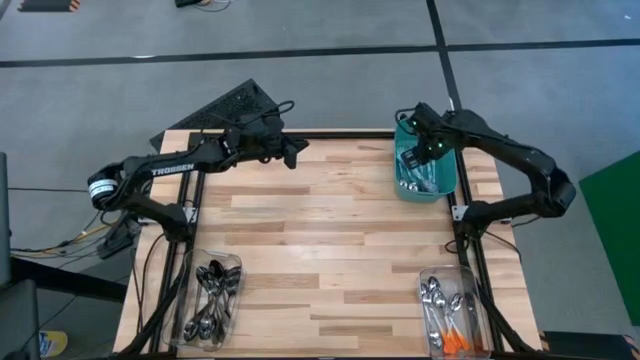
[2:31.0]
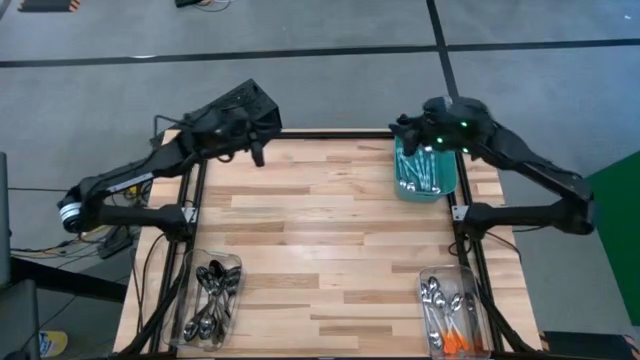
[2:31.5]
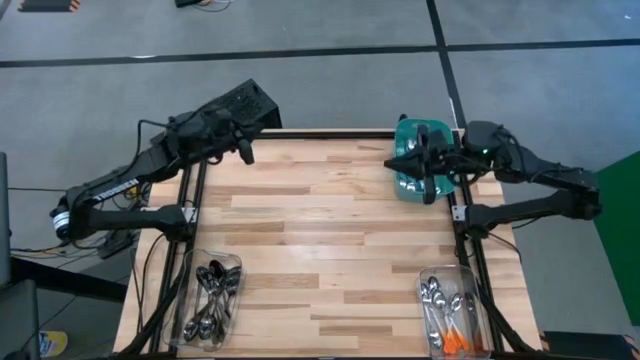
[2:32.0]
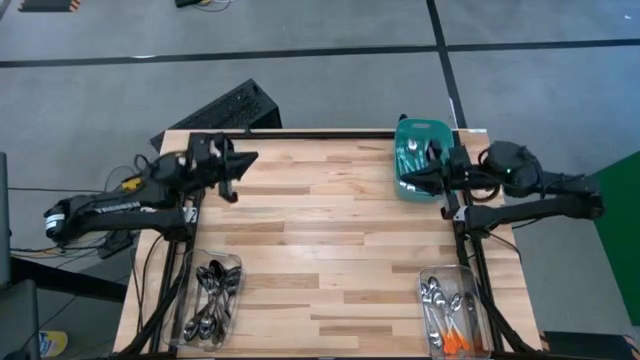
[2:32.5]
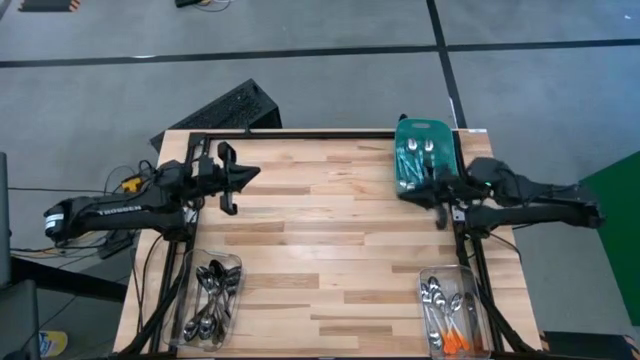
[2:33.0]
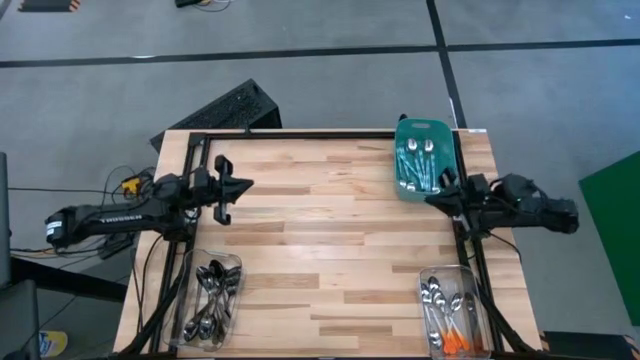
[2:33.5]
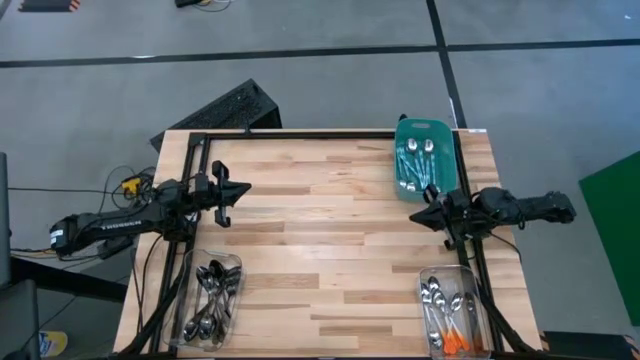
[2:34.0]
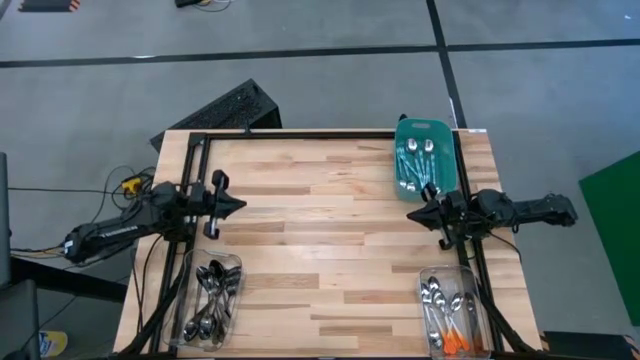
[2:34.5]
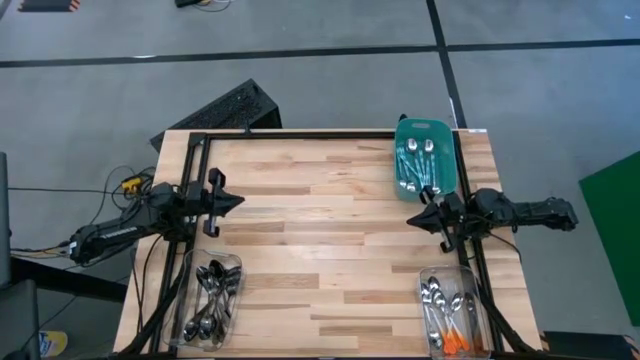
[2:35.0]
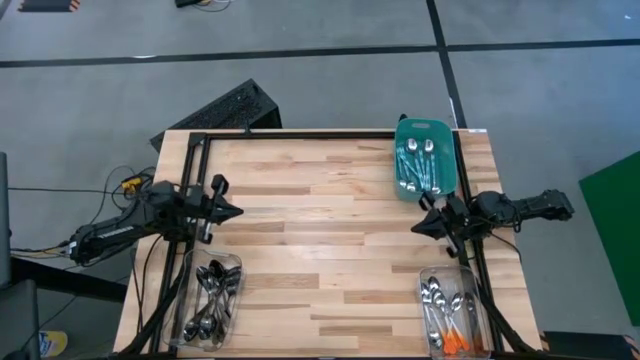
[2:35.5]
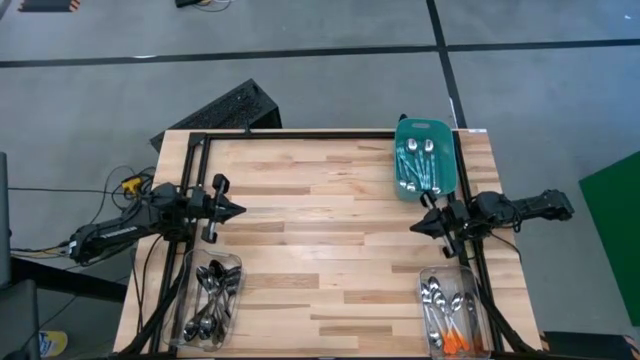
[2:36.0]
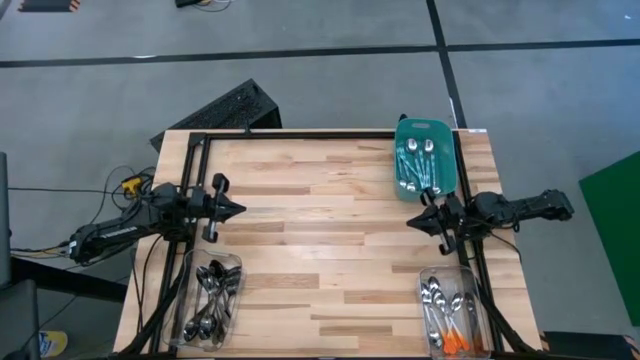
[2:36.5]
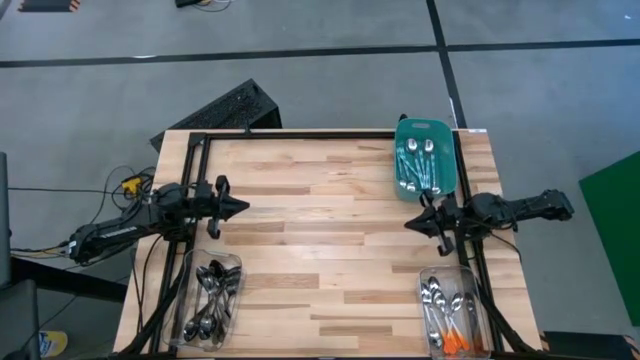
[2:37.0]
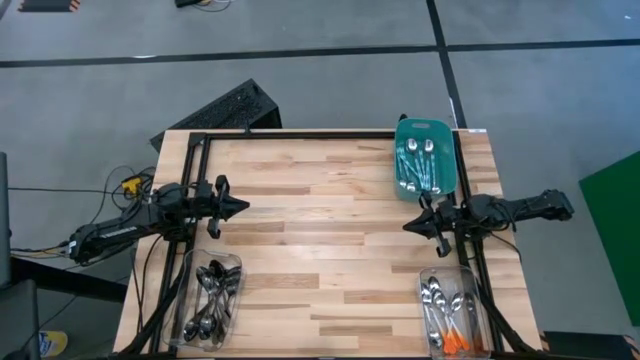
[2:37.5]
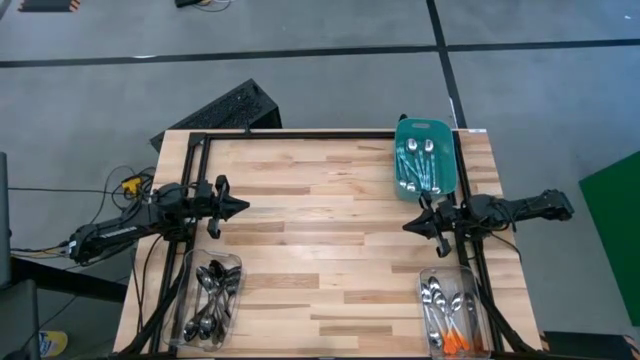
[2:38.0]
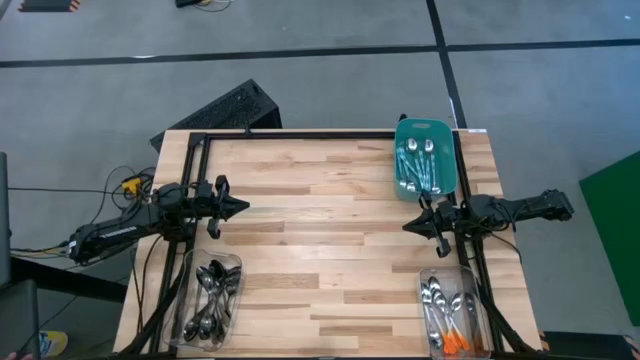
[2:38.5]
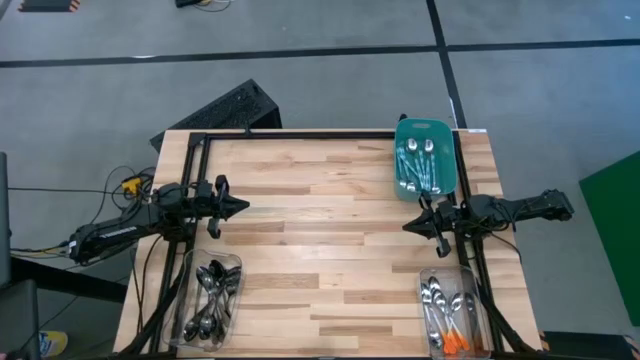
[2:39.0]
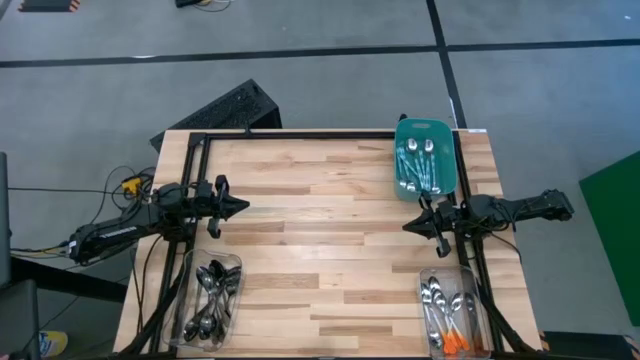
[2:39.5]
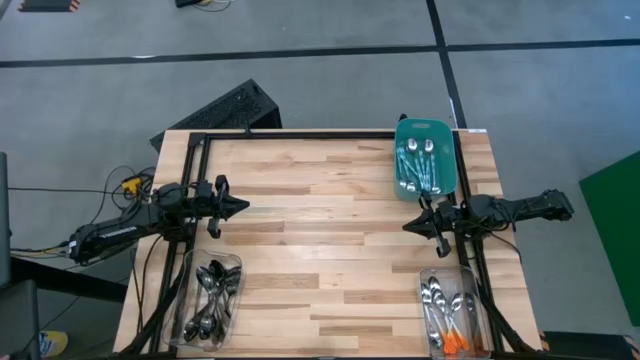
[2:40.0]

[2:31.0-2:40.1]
Task: Sort silverware by color (type)
Return to Home Position

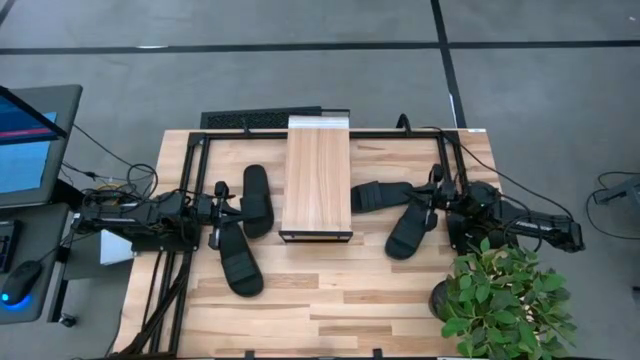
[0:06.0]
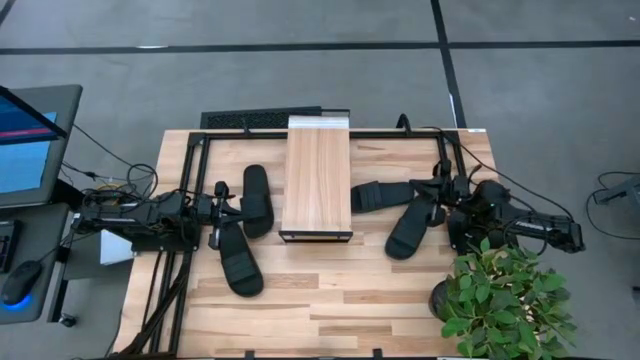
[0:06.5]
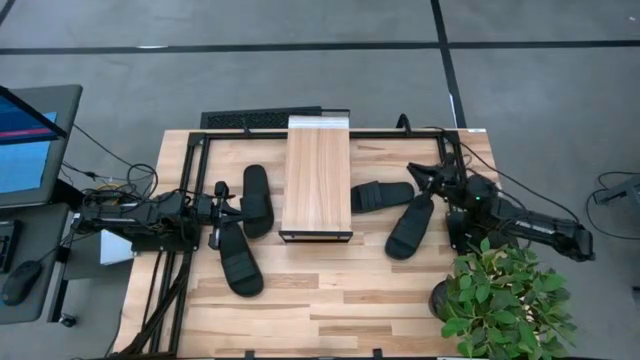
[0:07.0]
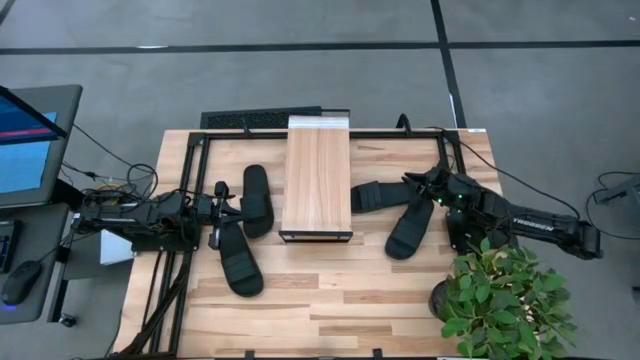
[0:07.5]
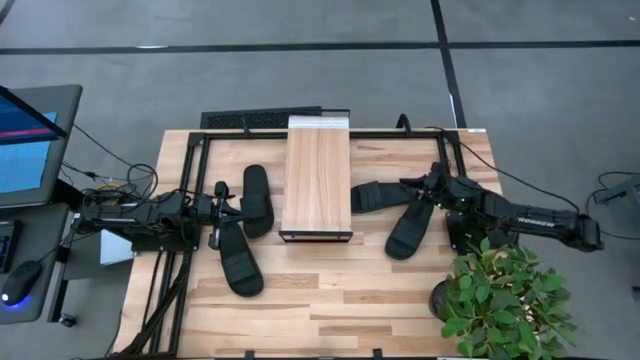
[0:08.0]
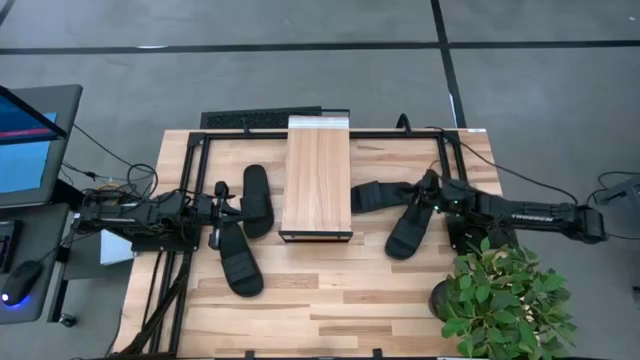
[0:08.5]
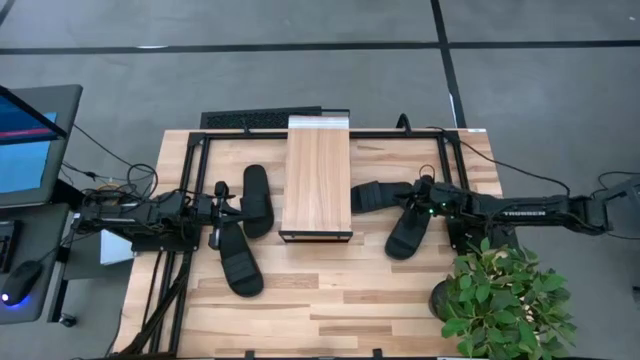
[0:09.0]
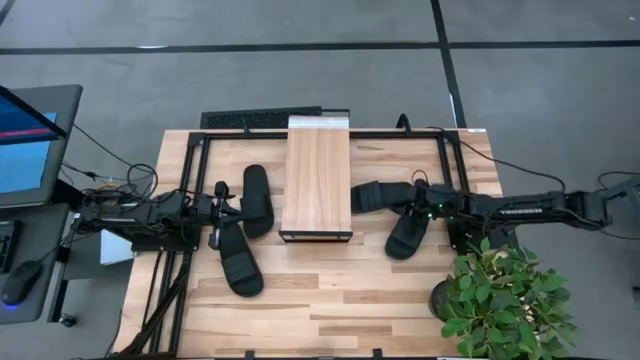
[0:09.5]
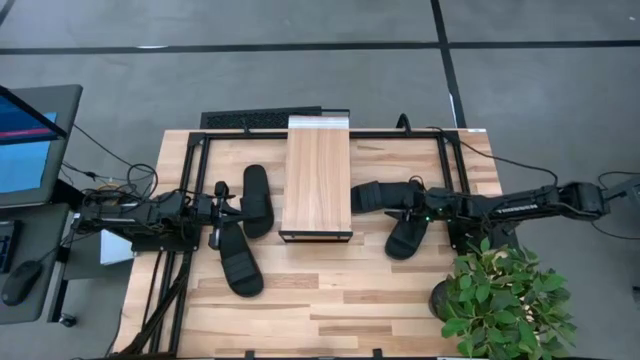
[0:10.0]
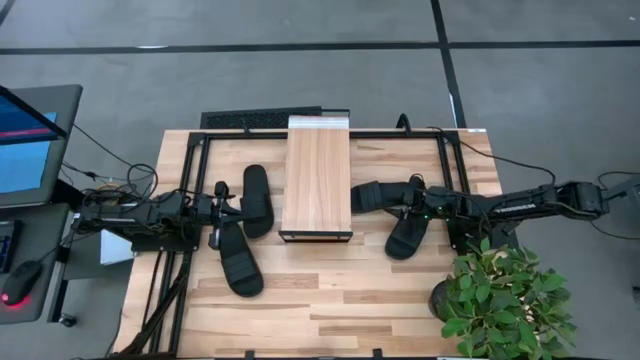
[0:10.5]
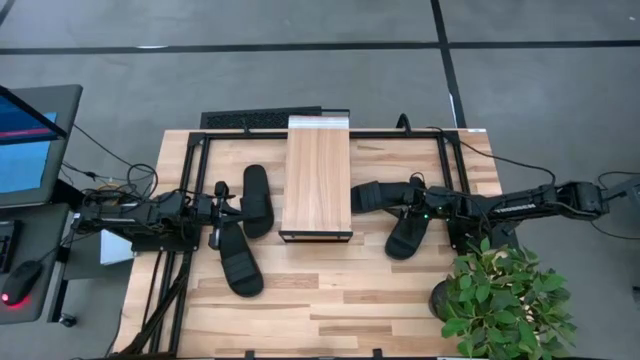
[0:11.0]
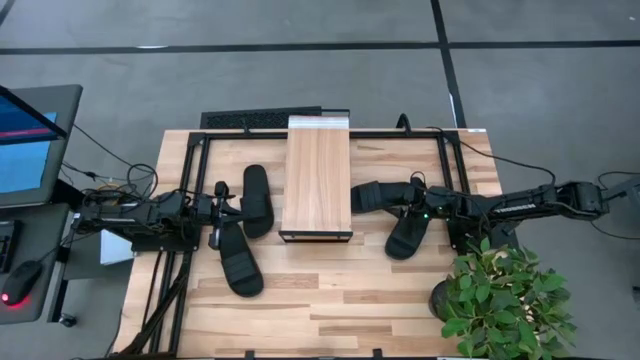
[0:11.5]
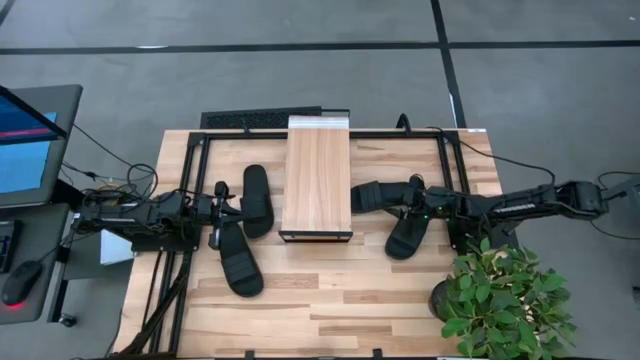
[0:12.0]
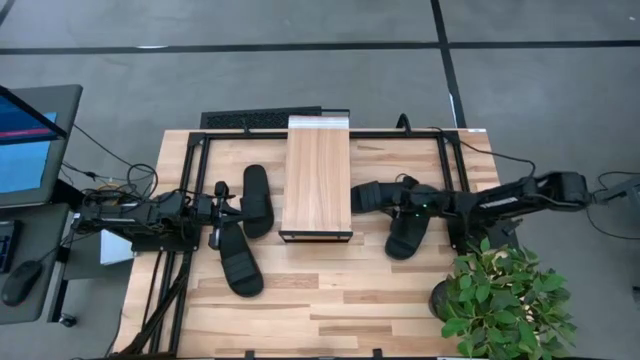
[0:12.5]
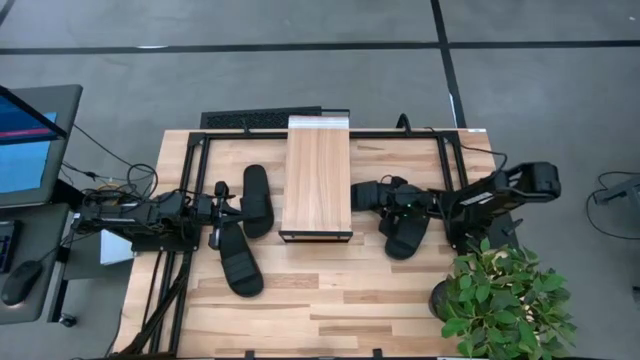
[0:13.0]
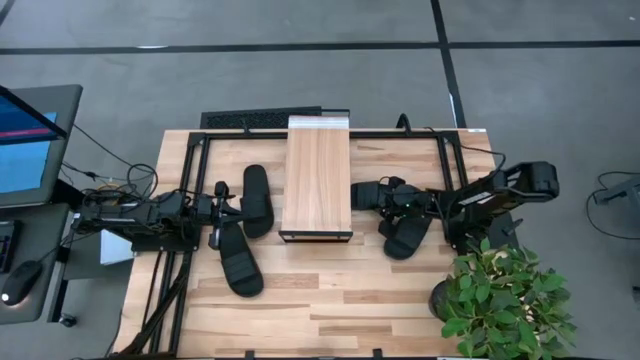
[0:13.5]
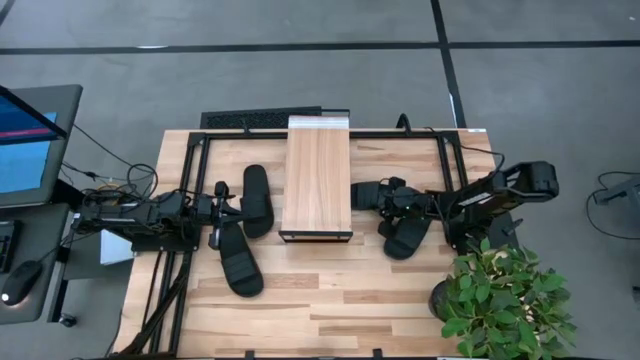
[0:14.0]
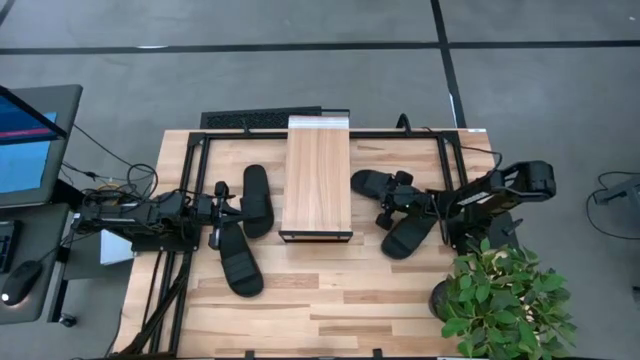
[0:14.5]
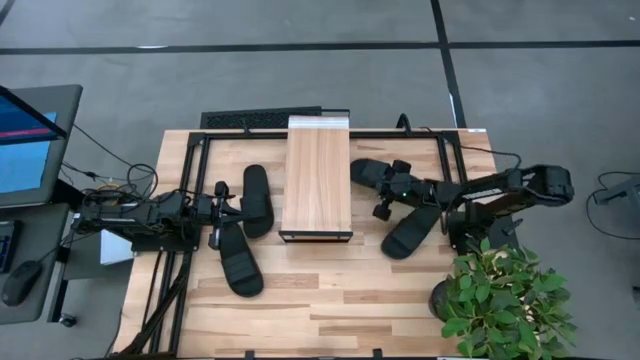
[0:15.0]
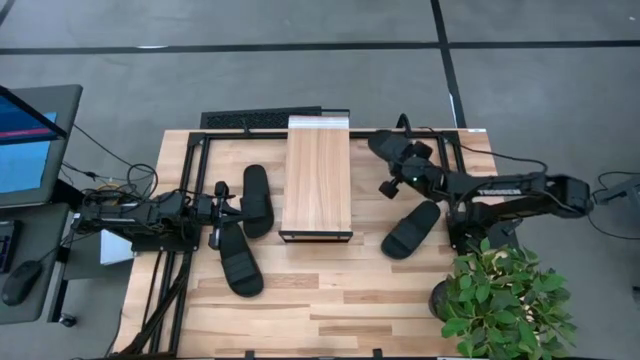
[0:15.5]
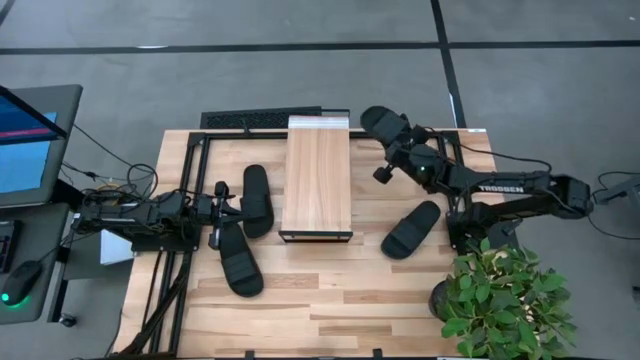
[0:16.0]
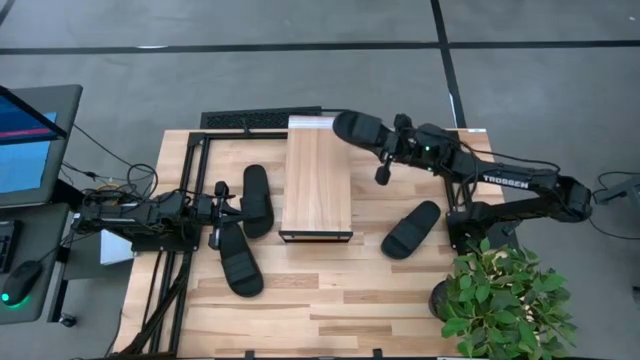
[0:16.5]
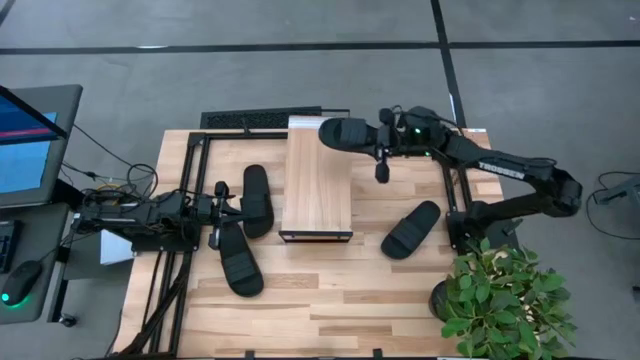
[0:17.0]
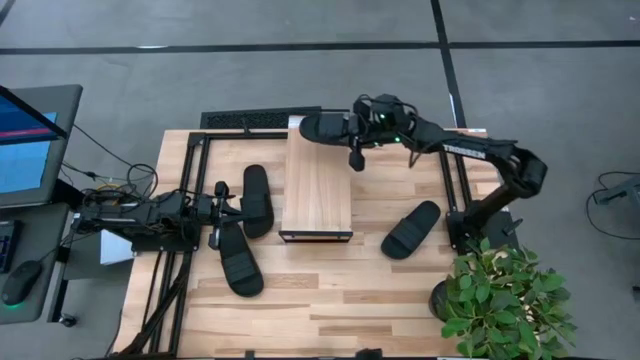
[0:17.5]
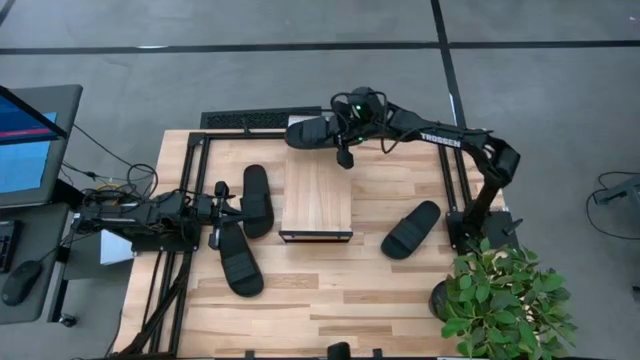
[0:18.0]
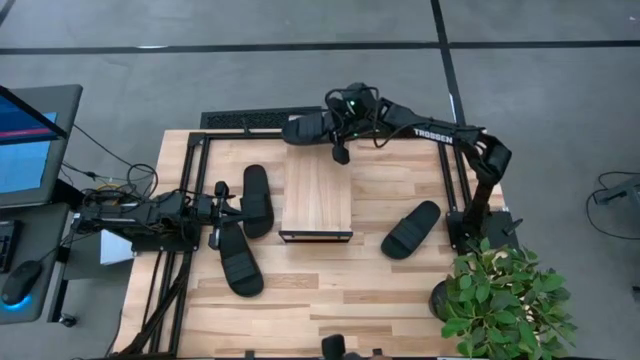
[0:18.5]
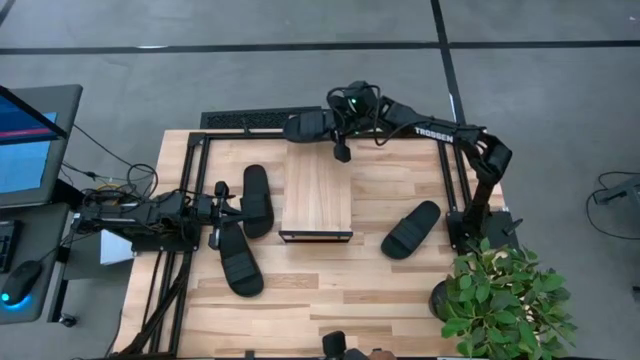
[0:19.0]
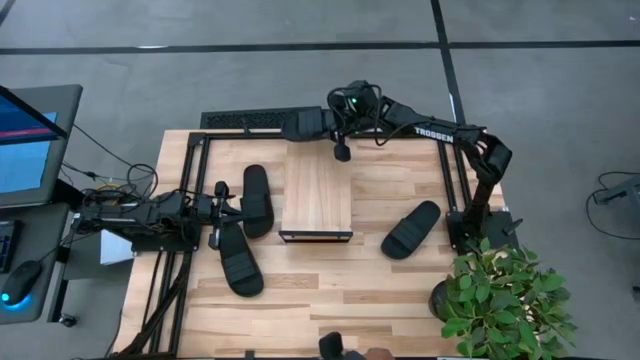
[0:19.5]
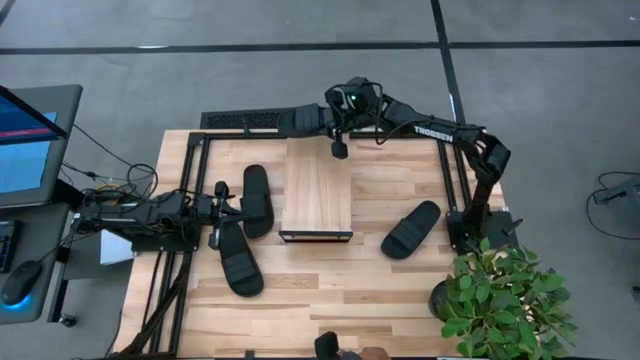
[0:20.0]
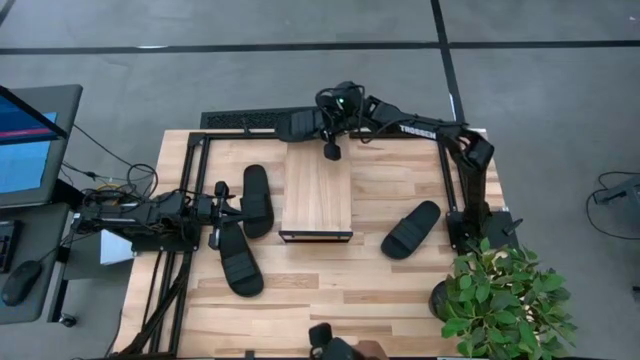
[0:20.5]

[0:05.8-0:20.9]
Task: Pick and place slides into the shelf
Put the black slide on the shelf
